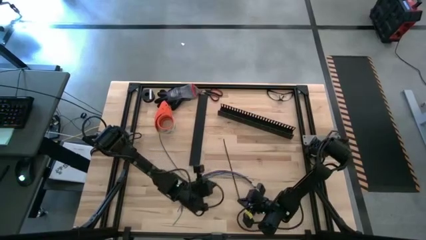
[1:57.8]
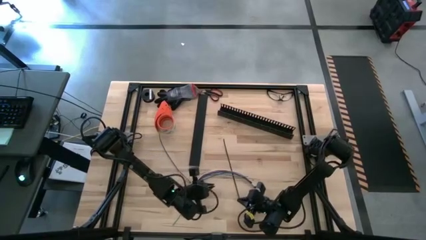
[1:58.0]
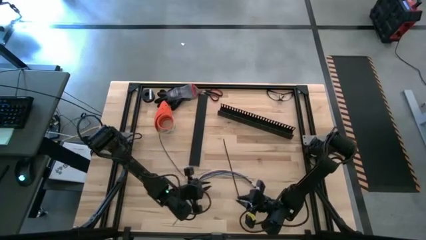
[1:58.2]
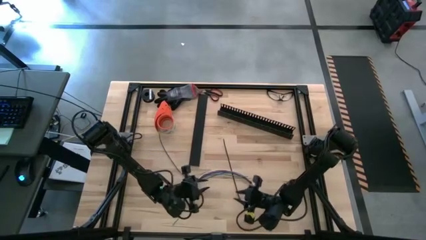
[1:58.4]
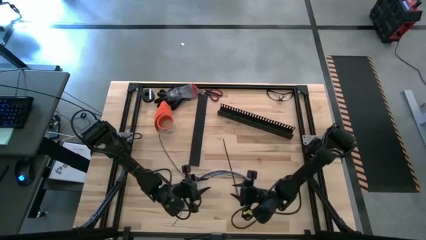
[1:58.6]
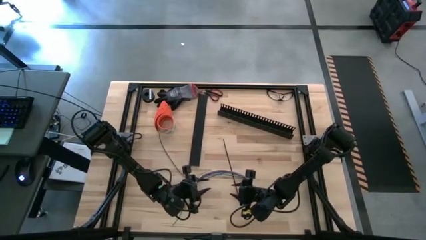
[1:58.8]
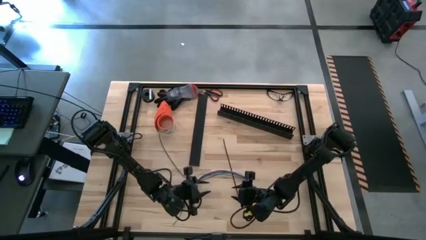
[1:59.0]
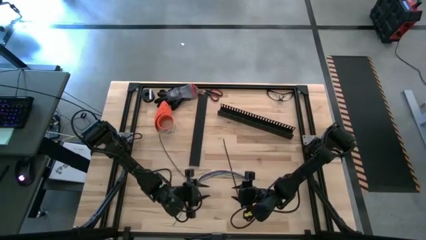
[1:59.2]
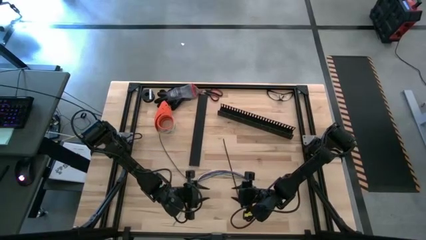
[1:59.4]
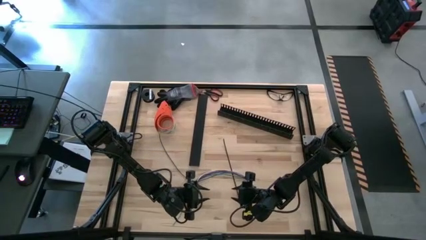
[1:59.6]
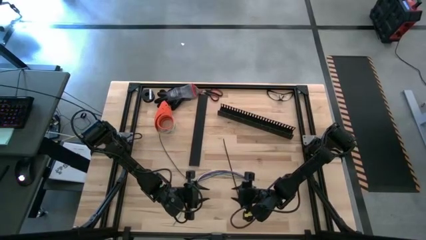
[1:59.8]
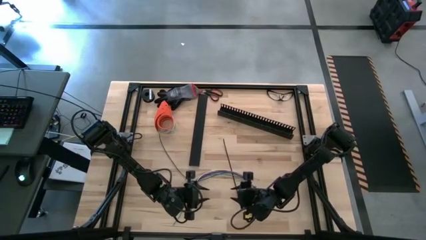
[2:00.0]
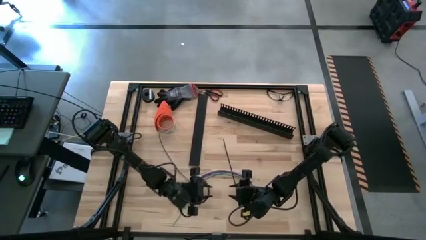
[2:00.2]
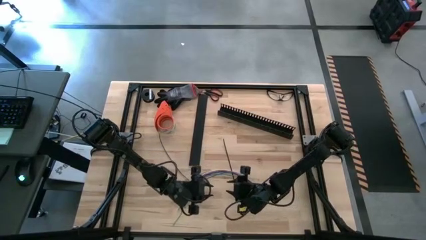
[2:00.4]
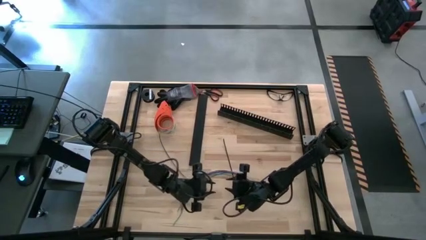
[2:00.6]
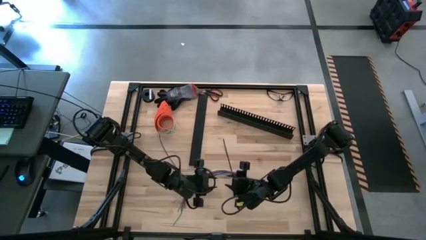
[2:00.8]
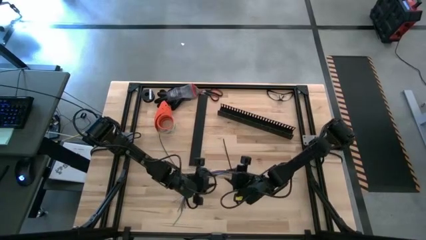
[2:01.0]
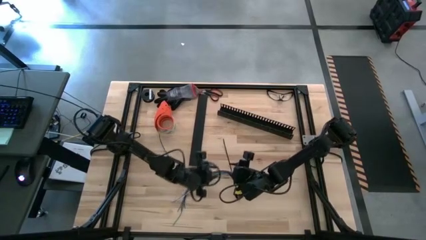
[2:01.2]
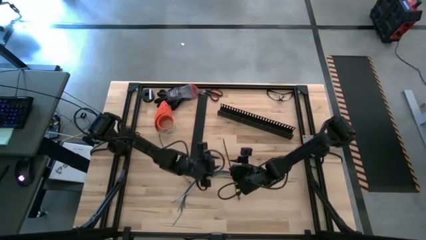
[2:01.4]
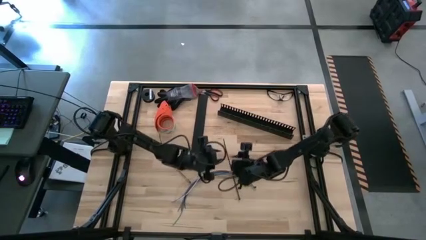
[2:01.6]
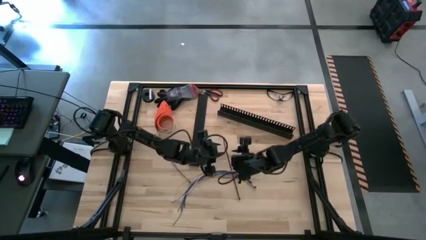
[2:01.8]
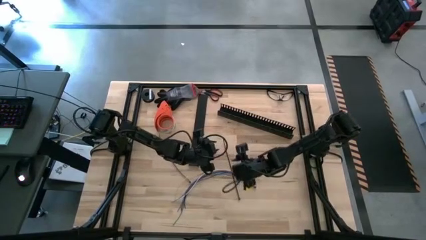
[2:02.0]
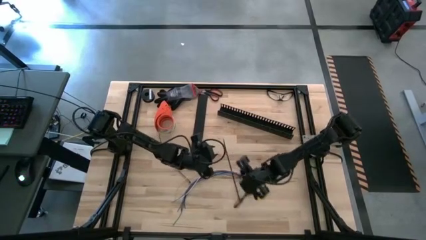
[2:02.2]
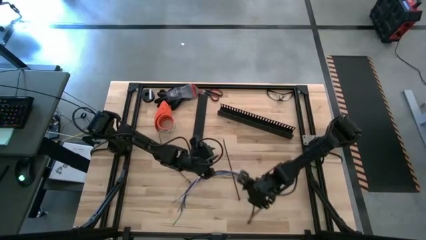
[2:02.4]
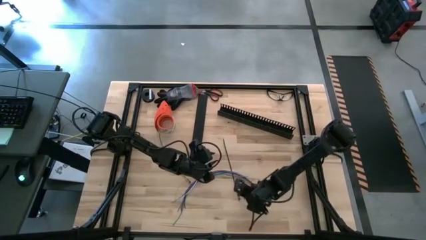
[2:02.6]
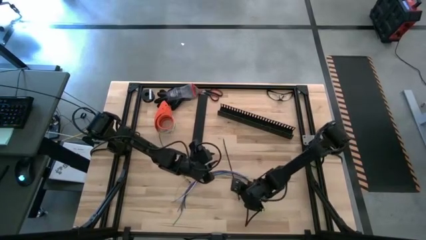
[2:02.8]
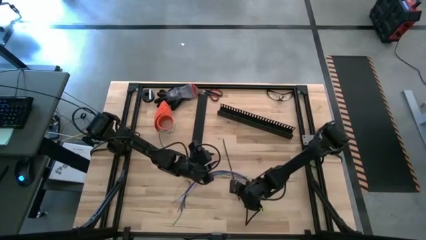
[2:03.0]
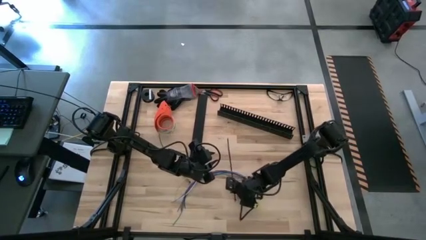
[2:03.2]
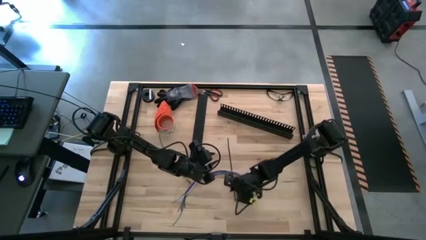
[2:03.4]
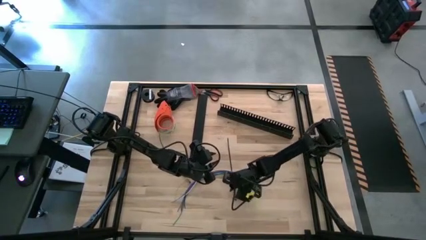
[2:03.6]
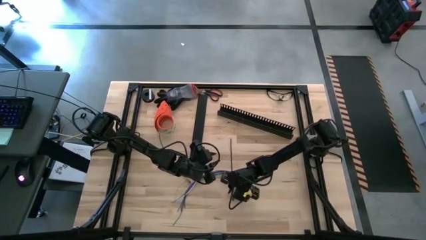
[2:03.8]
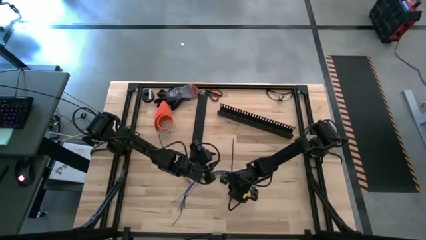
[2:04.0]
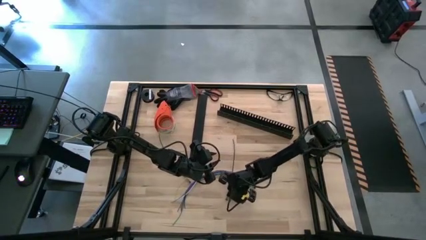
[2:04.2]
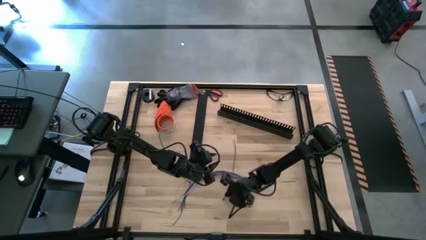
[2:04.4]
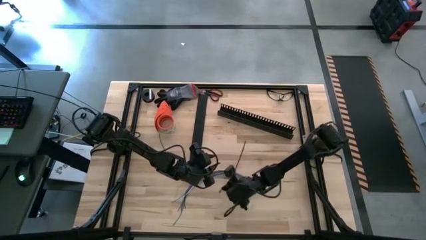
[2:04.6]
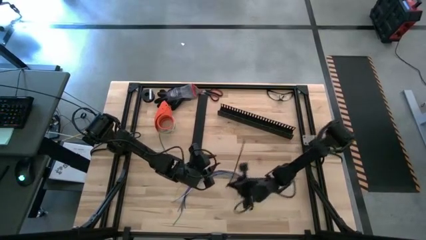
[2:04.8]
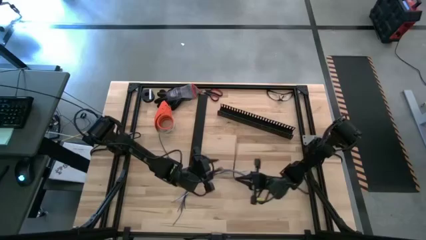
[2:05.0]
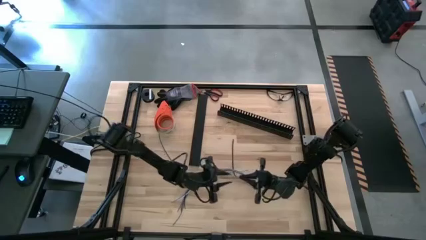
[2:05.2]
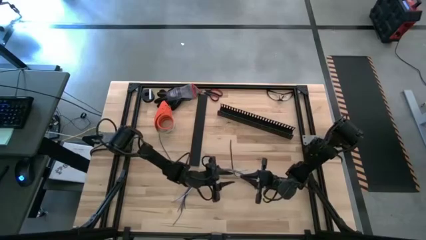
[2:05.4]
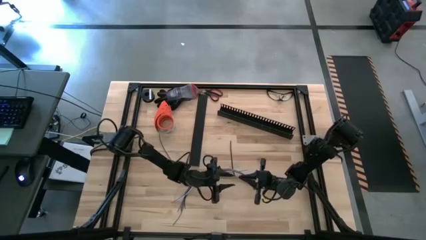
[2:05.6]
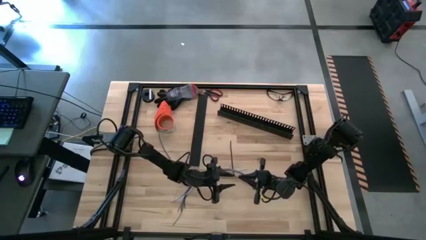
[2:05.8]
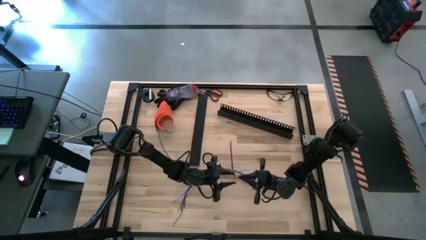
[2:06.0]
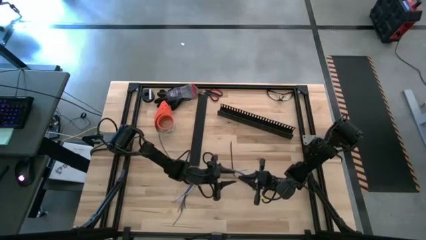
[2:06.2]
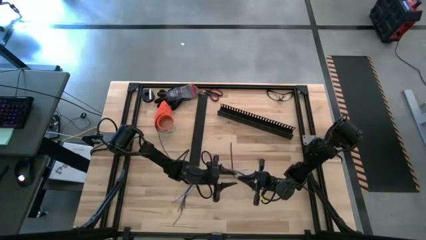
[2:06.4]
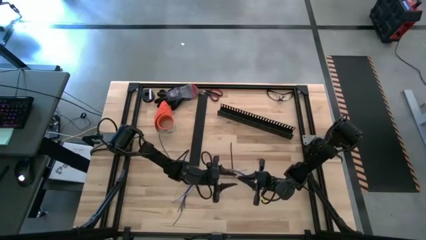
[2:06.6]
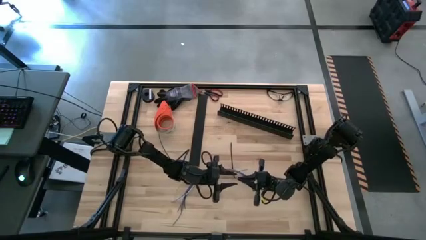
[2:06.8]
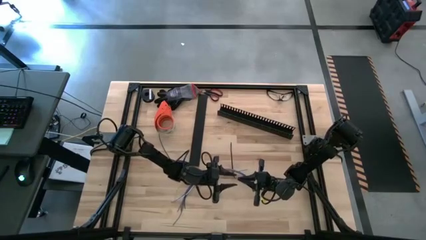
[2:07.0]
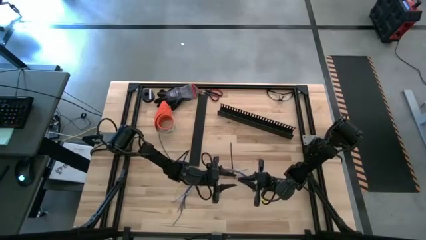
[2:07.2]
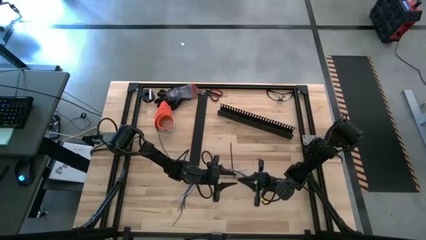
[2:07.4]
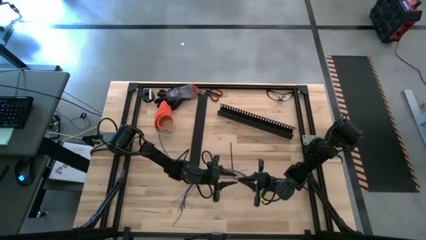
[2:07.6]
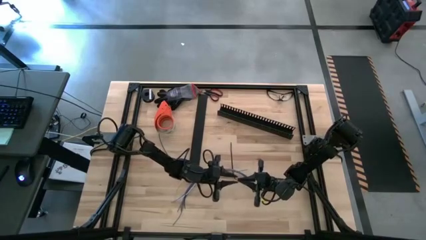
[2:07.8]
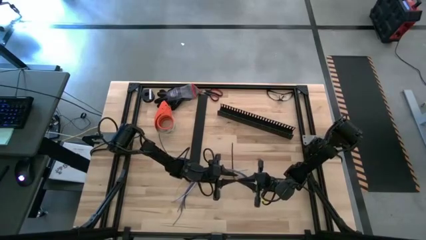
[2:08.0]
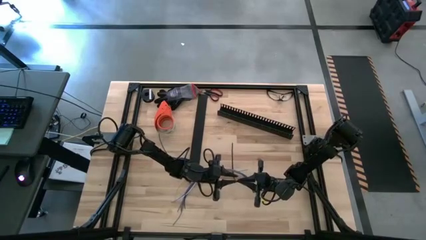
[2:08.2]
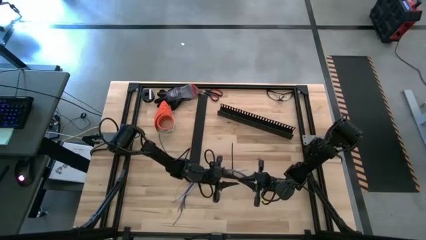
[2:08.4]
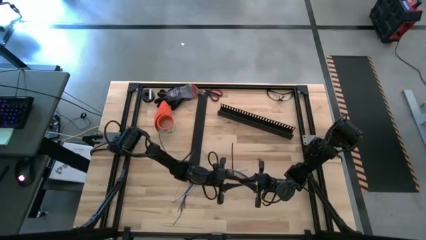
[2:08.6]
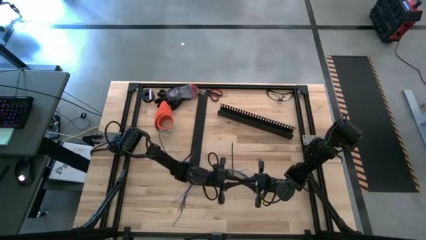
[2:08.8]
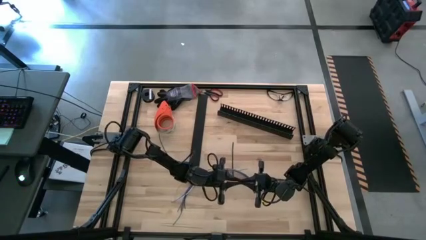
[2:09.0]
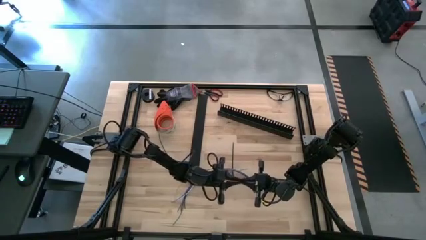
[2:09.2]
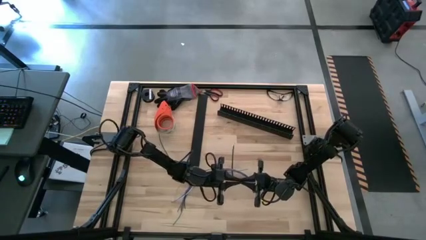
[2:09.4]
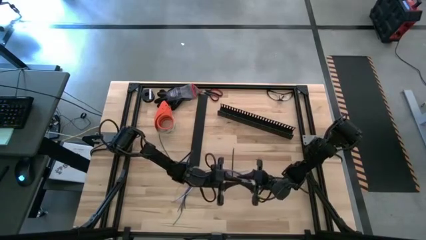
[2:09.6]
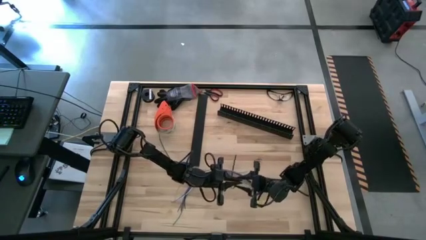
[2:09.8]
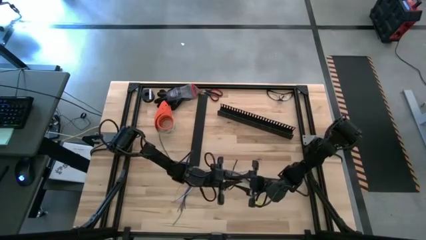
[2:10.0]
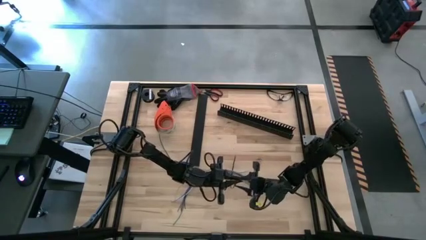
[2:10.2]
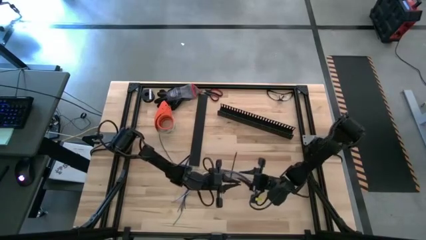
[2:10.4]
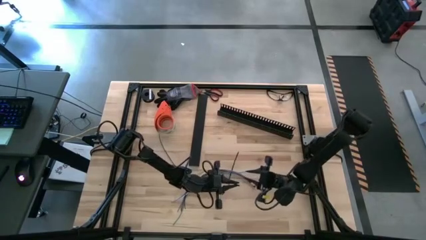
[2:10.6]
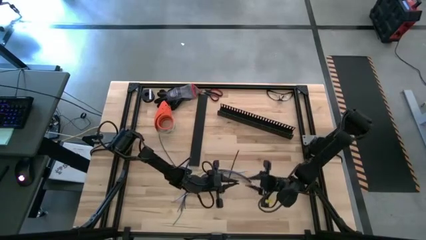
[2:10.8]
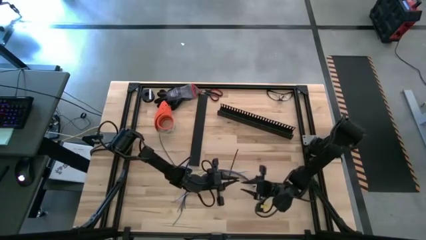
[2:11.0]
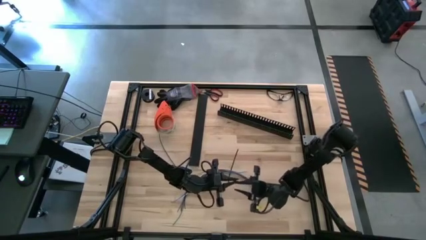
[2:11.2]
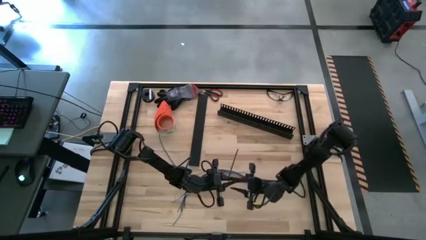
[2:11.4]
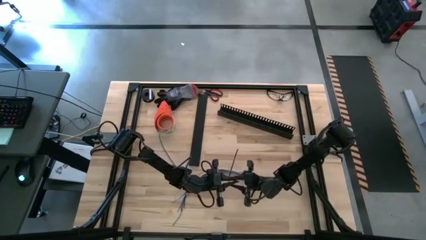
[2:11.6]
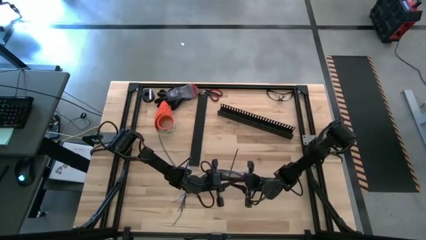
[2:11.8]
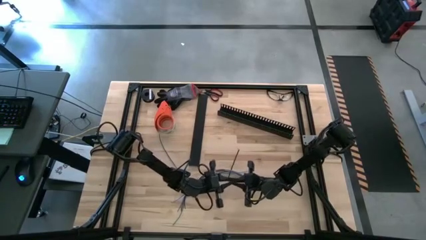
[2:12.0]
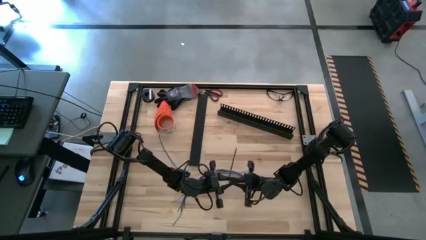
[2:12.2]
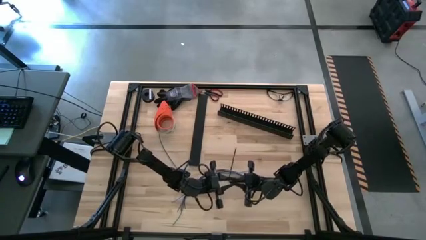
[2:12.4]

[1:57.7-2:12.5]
Task: Ziptie cables
Wrap the black zip tie on the cables
